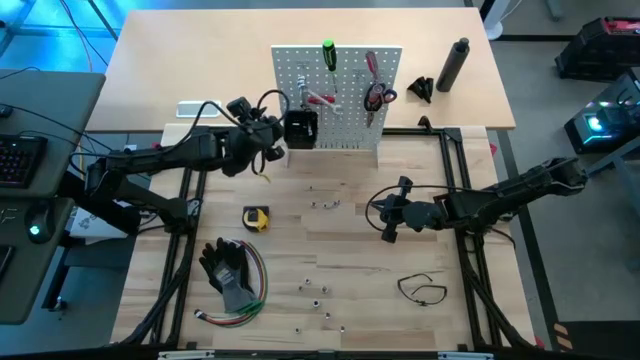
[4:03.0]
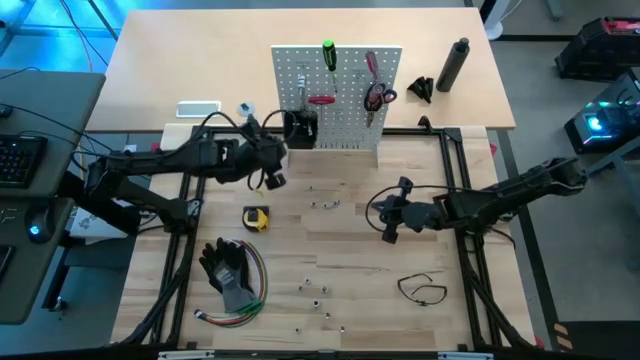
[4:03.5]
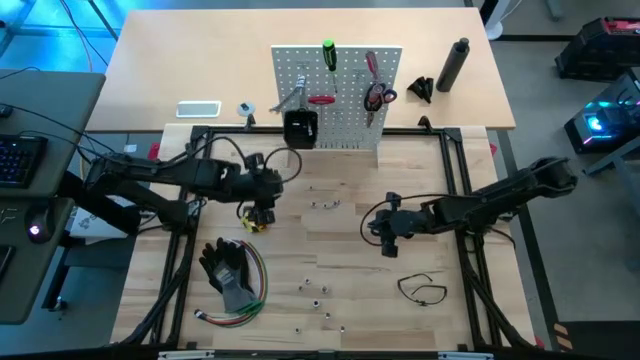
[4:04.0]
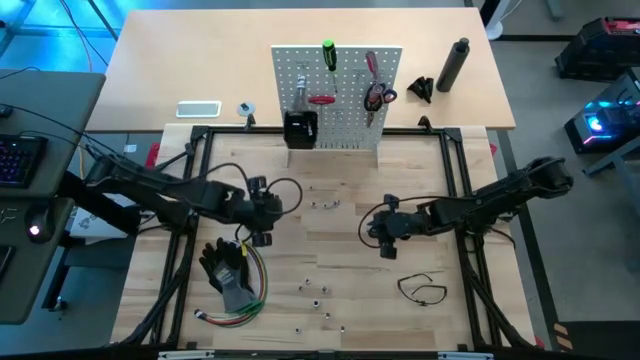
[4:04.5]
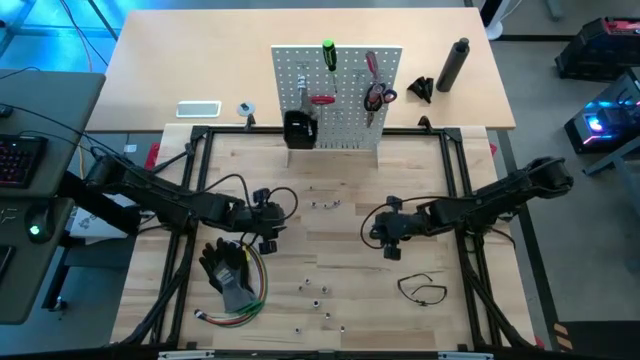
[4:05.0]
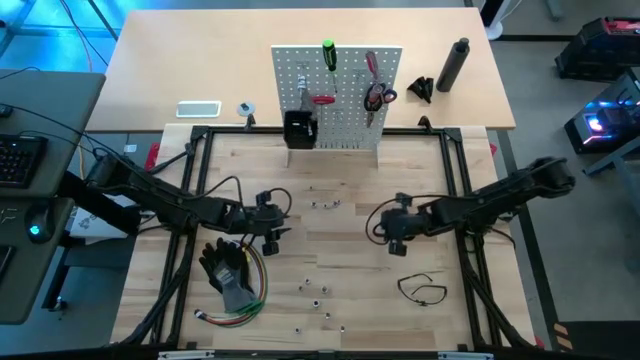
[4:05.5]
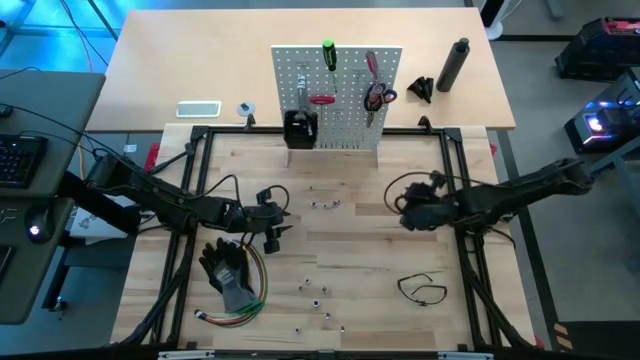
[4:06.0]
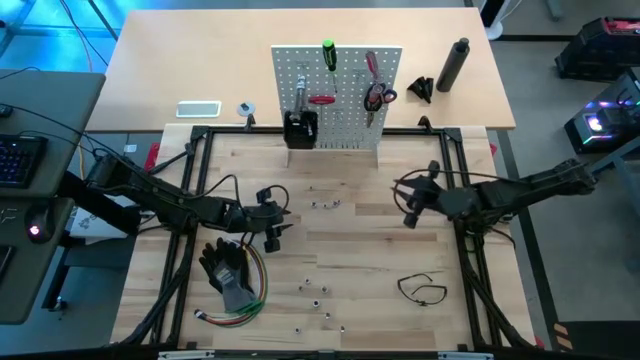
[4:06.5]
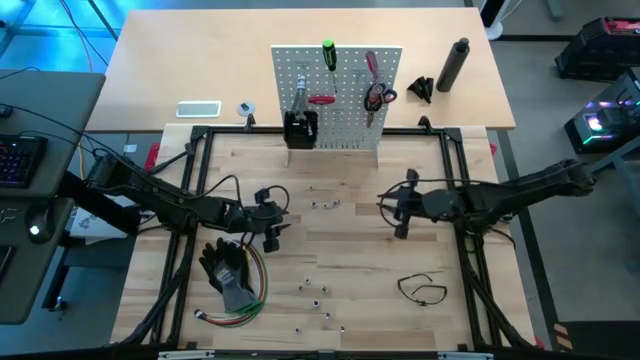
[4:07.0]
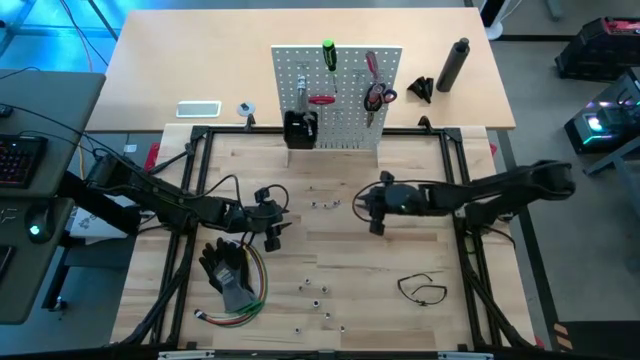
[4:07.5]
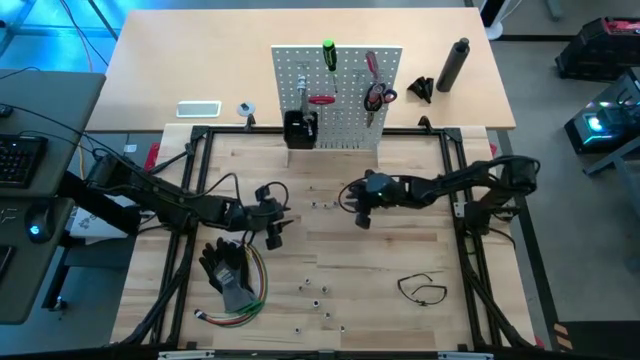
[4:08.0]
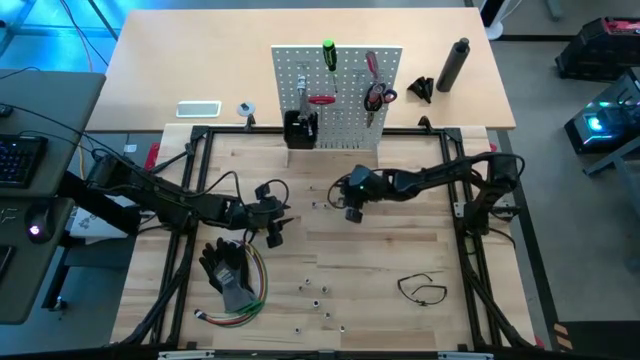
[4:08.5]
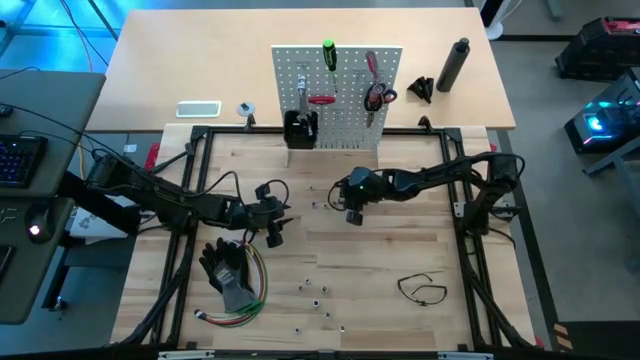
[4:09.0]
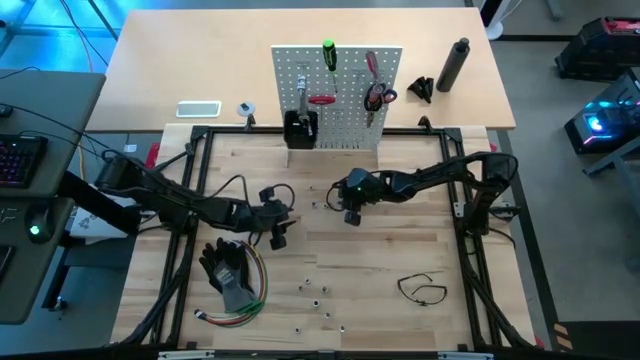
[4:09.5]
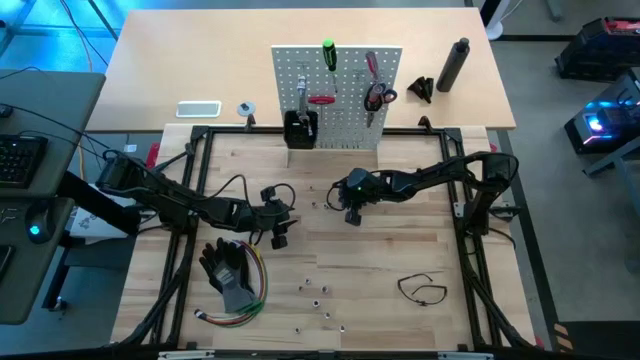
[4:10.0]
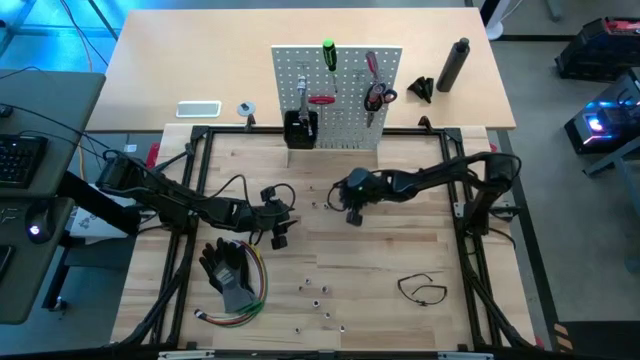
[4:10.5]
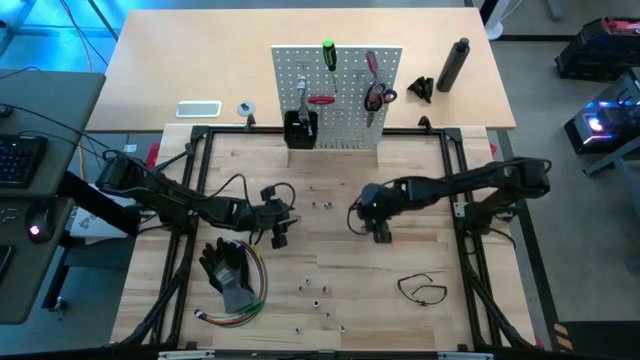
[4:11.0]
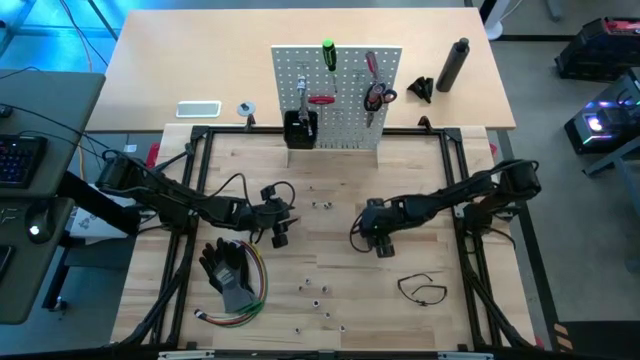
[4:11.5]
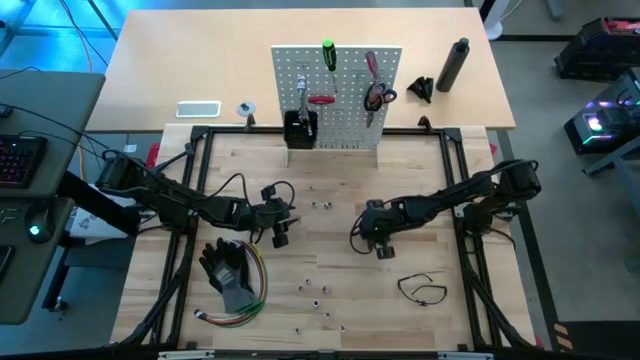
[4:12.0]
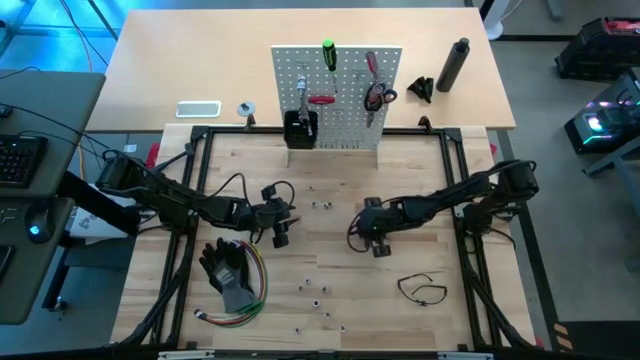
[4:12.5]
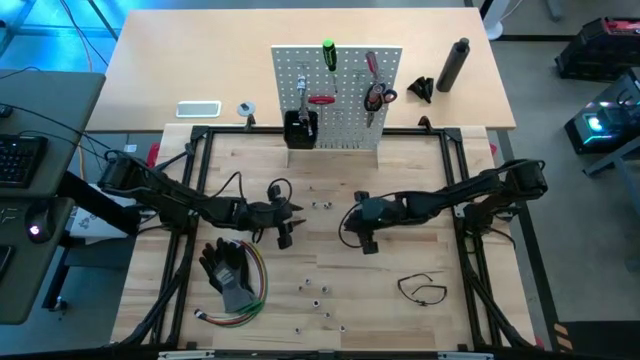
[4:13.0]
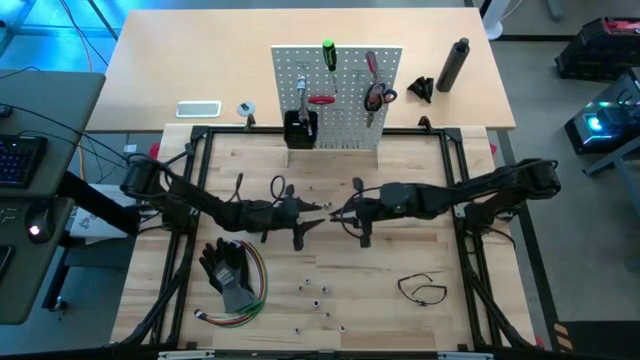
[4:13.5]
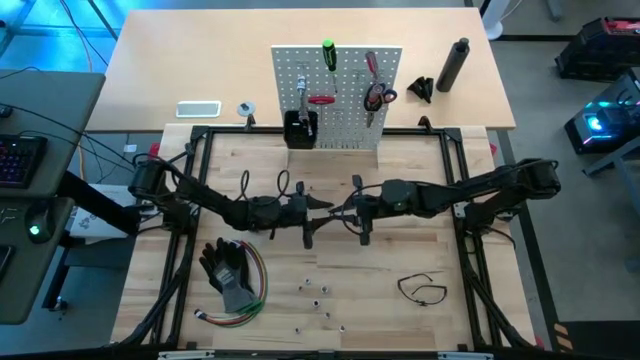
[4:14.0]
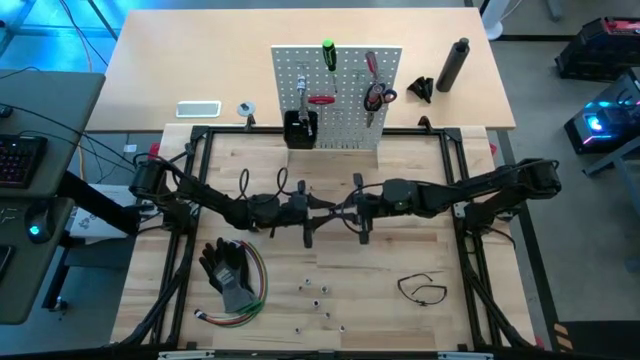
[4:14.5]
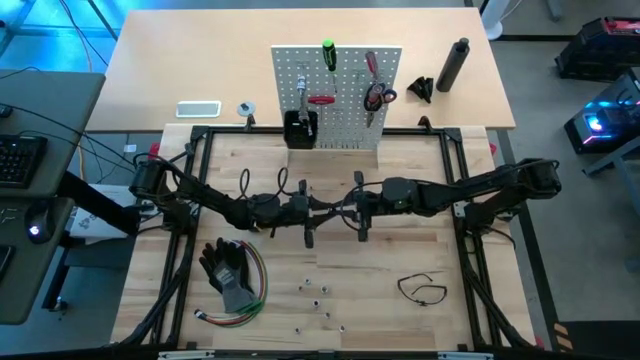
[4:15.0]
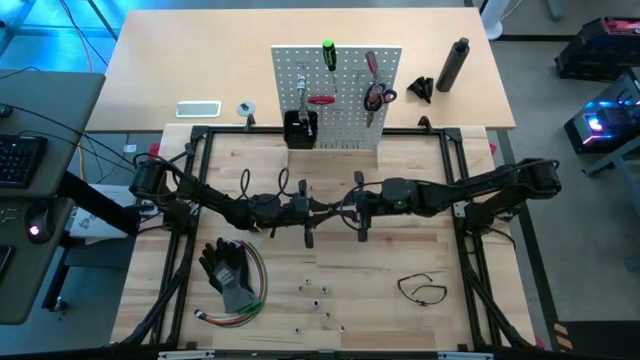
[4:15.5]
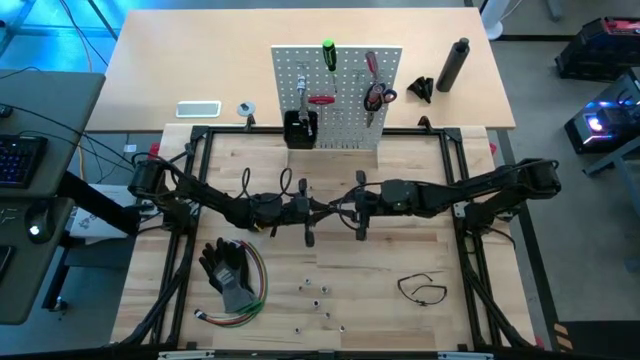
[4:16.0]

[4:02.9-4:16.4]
Task: Hang tools onto peg board
Put the silver socket into the black bin on the white peg board

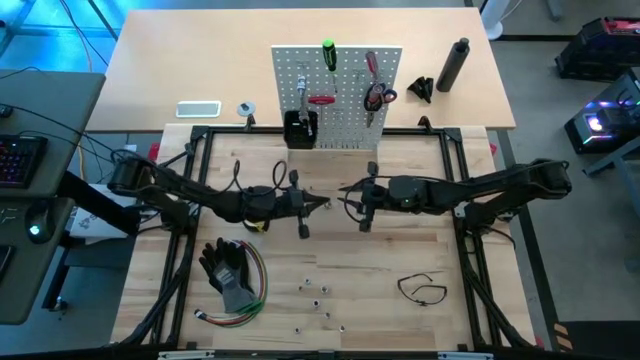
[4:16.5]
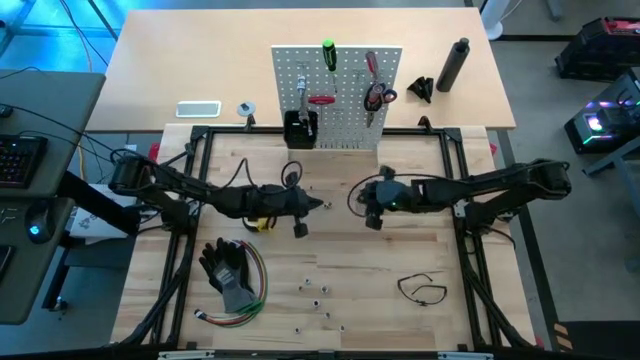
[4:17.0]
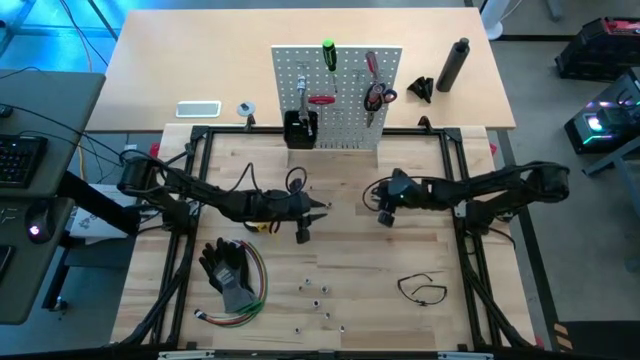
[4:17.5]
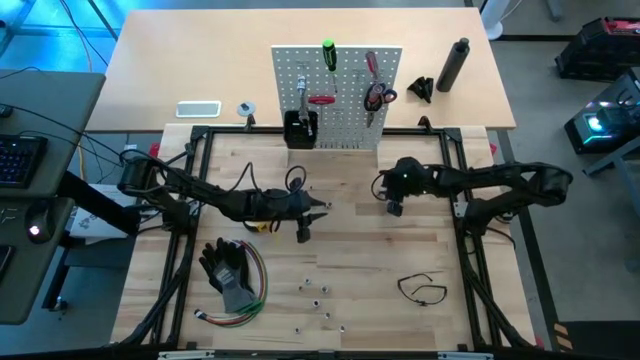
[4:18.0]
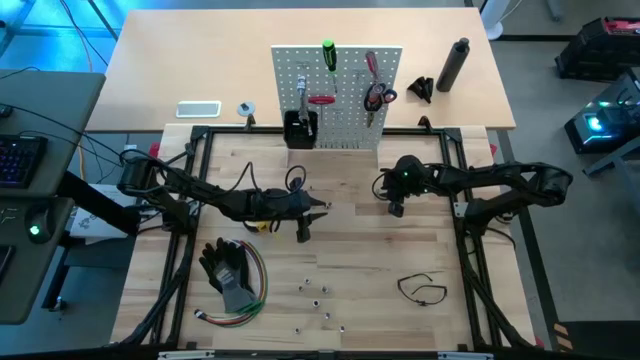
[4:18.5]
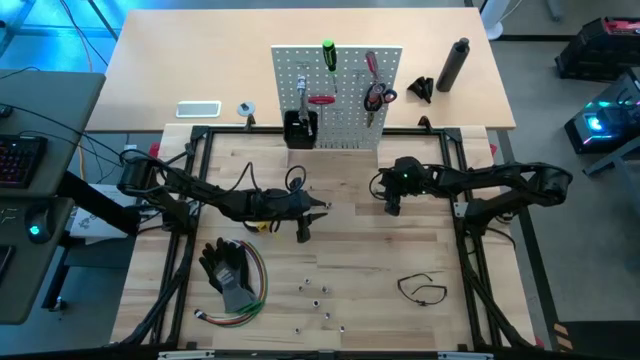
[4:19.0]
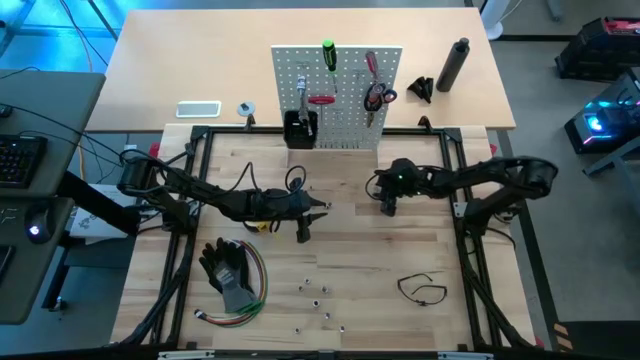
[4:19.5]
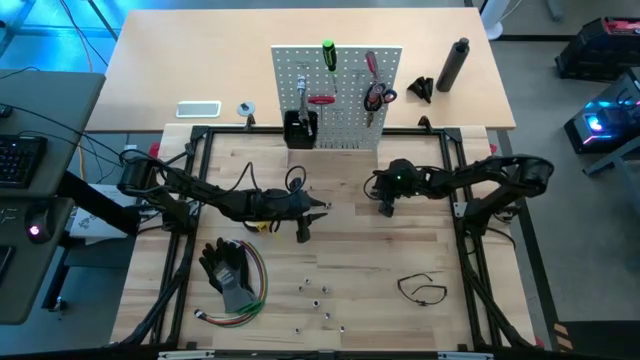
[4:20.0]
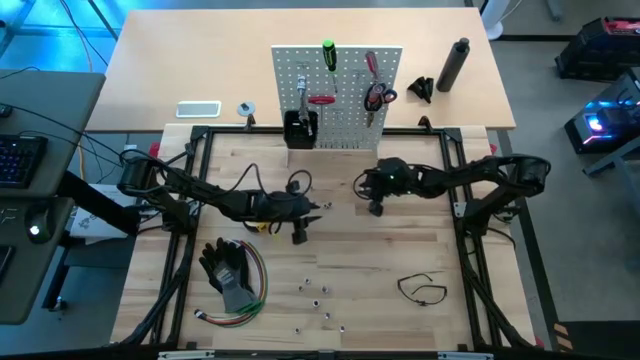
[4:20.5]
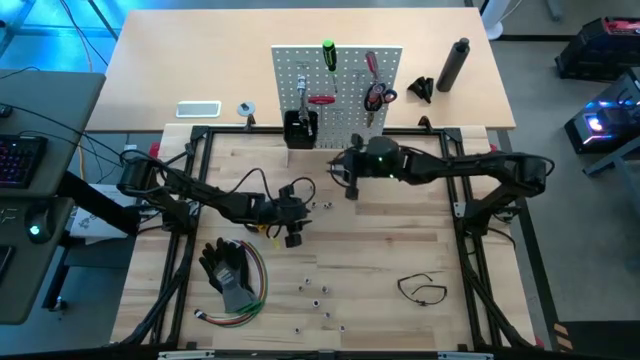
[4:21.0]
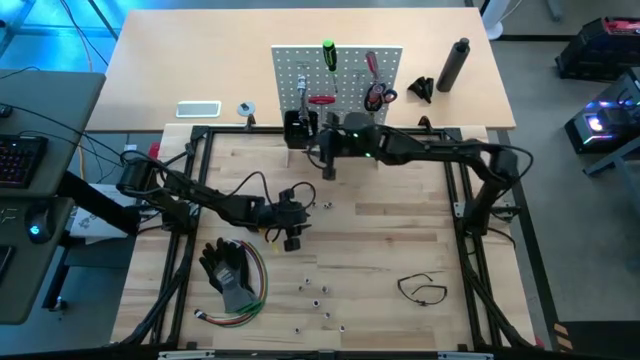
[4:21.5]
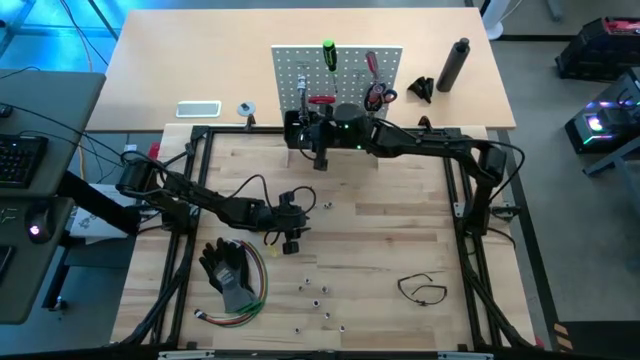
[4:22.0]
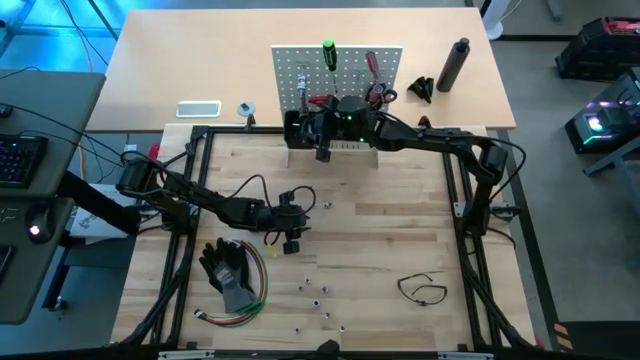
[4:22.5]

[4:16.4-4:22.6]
Put the silver socket into the black bin on the white peg board
